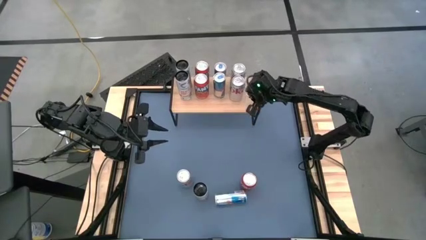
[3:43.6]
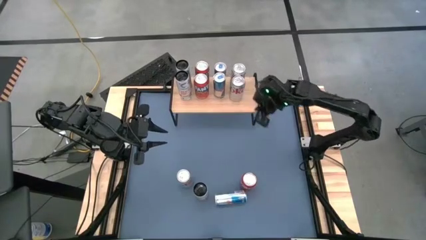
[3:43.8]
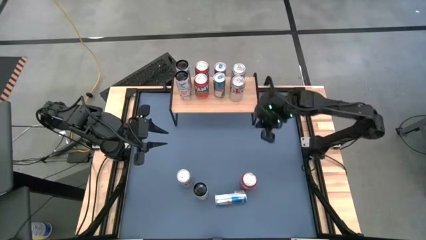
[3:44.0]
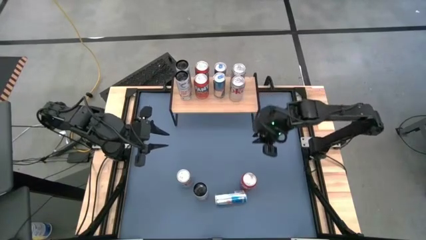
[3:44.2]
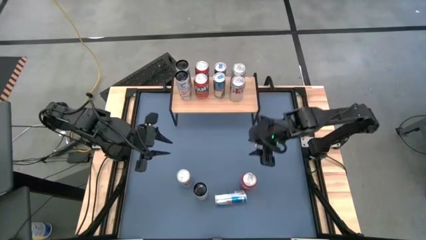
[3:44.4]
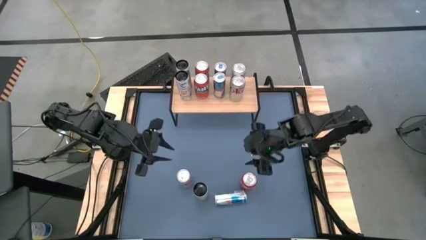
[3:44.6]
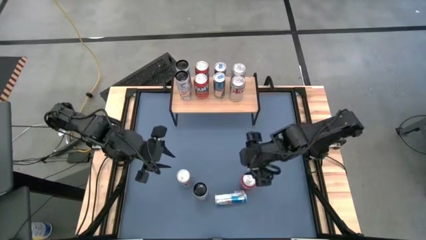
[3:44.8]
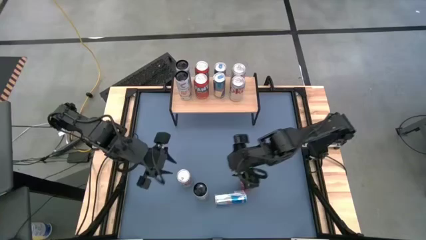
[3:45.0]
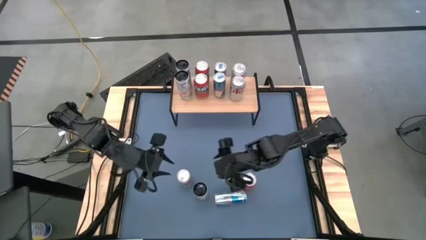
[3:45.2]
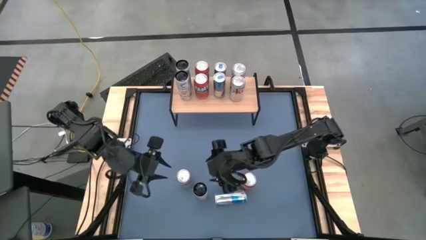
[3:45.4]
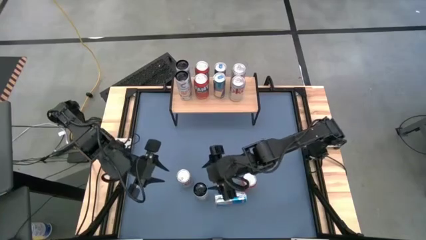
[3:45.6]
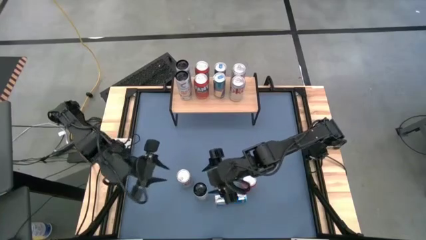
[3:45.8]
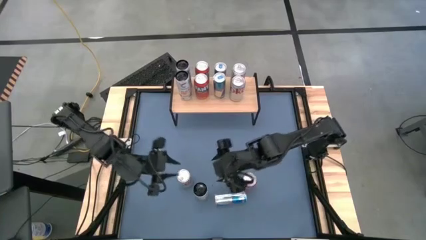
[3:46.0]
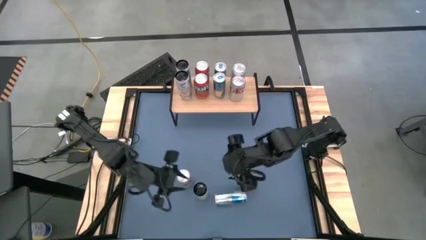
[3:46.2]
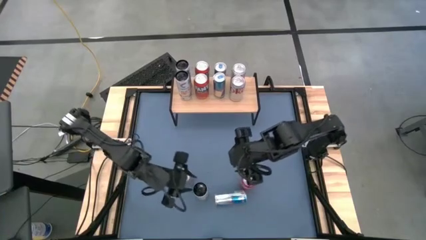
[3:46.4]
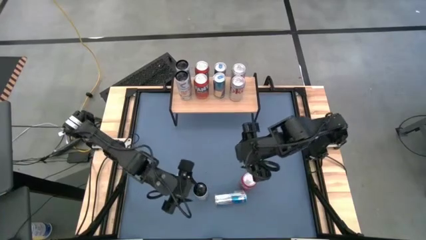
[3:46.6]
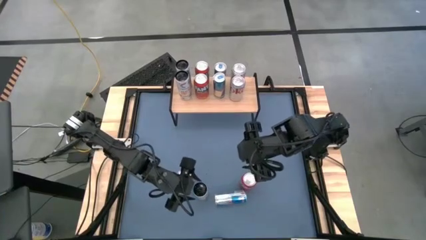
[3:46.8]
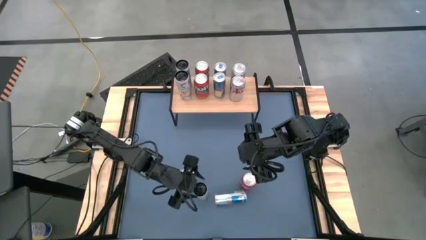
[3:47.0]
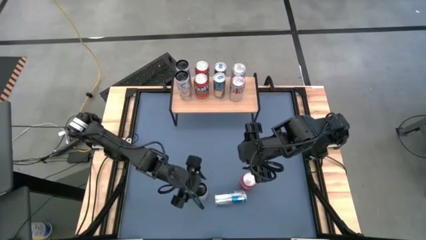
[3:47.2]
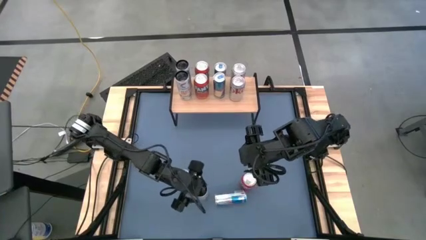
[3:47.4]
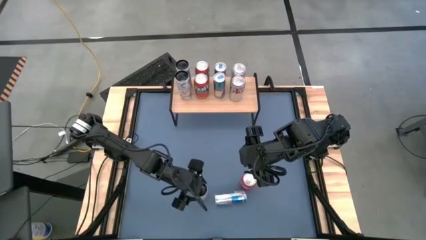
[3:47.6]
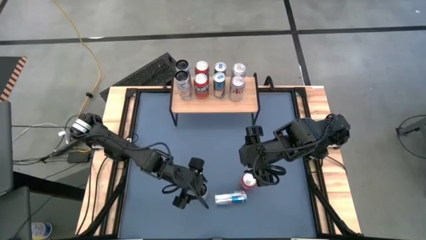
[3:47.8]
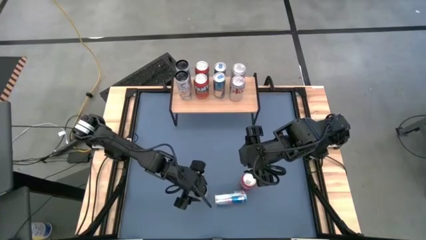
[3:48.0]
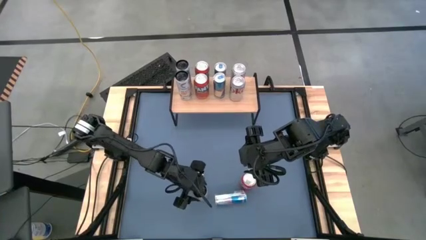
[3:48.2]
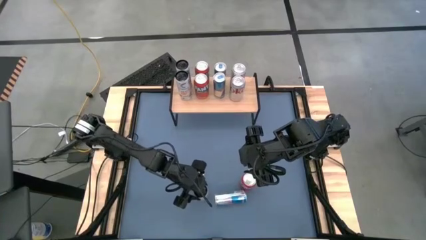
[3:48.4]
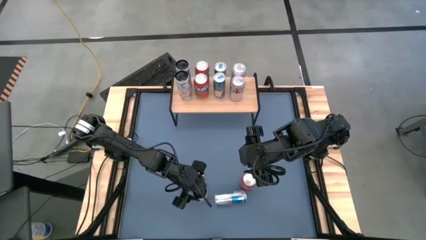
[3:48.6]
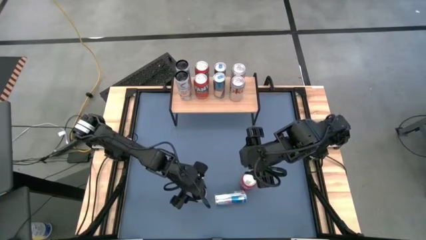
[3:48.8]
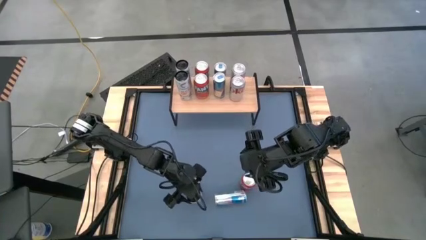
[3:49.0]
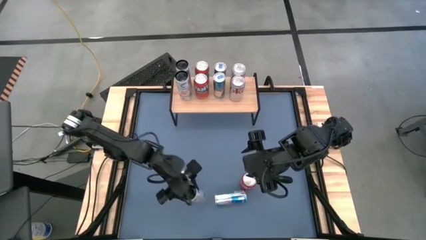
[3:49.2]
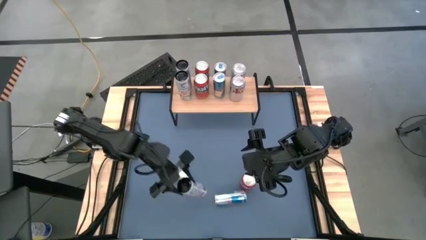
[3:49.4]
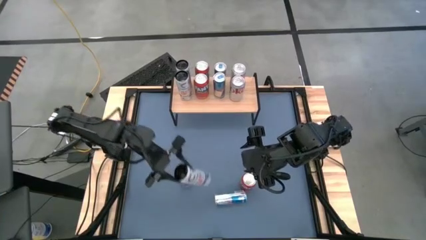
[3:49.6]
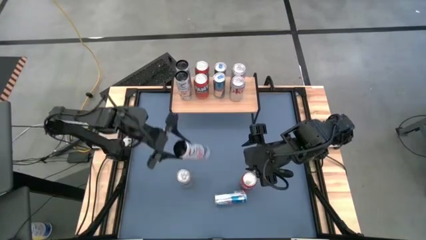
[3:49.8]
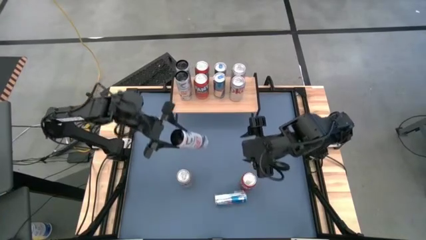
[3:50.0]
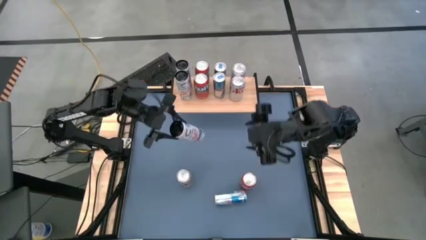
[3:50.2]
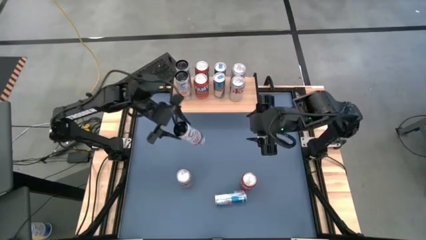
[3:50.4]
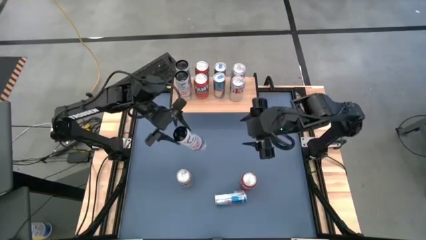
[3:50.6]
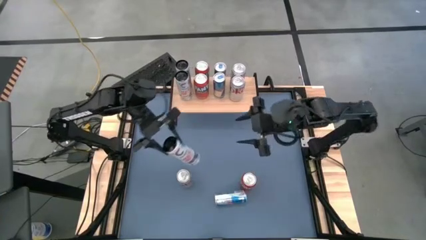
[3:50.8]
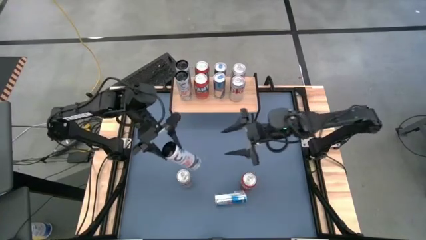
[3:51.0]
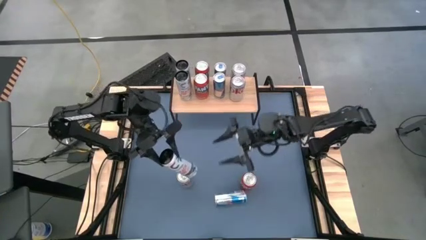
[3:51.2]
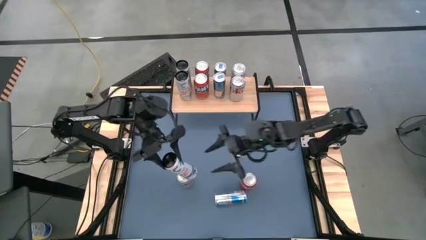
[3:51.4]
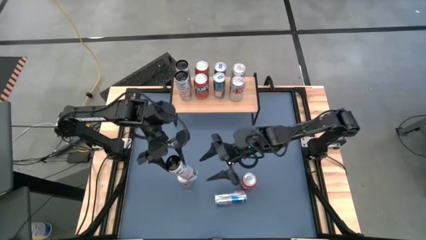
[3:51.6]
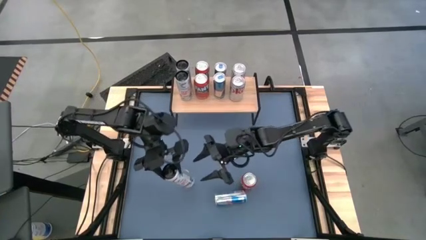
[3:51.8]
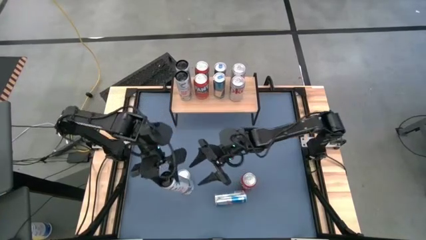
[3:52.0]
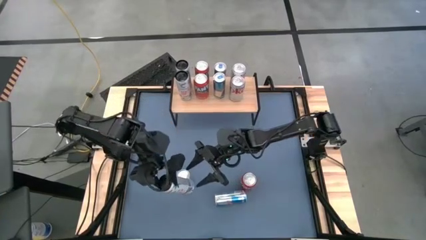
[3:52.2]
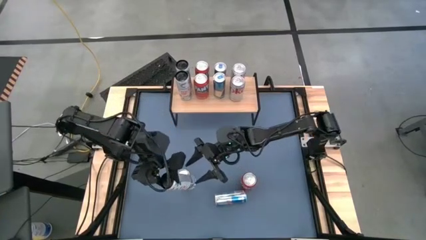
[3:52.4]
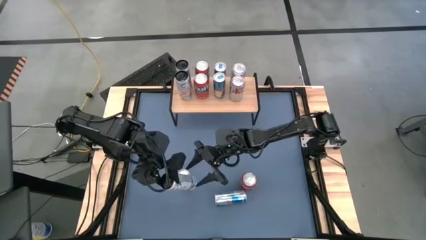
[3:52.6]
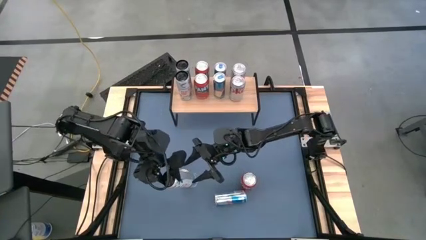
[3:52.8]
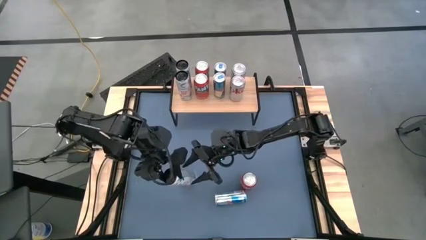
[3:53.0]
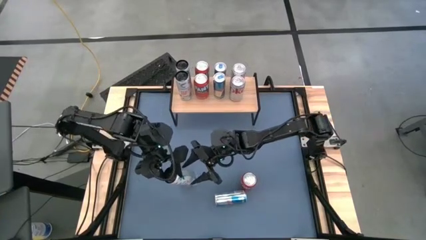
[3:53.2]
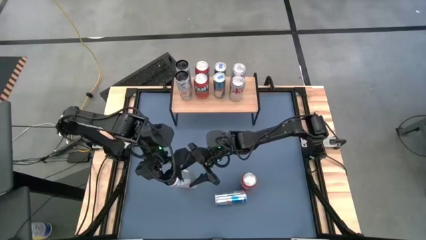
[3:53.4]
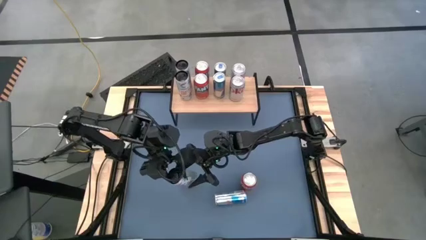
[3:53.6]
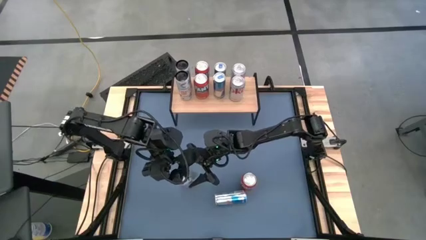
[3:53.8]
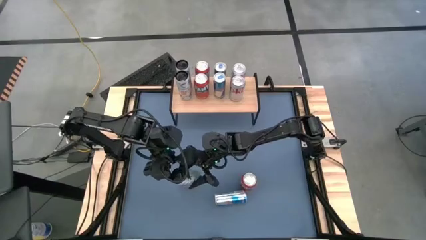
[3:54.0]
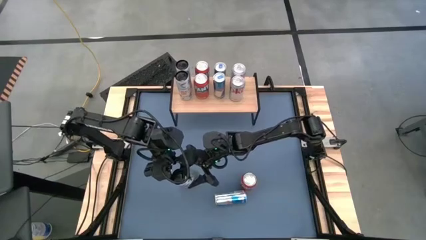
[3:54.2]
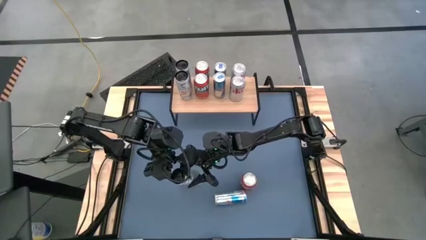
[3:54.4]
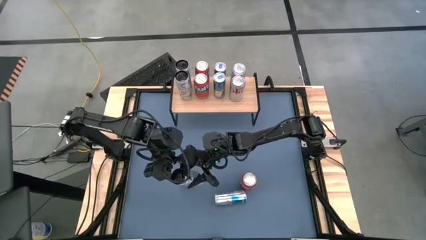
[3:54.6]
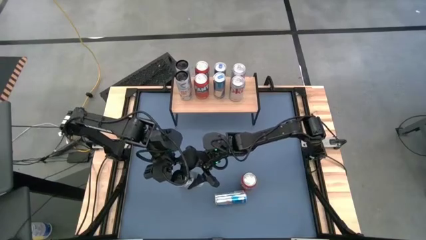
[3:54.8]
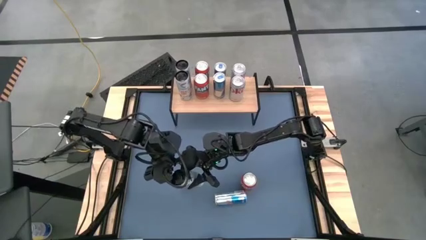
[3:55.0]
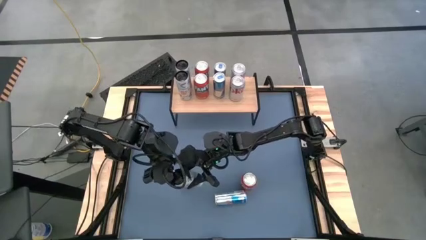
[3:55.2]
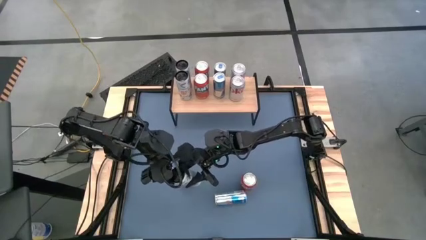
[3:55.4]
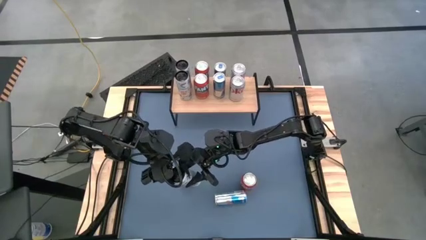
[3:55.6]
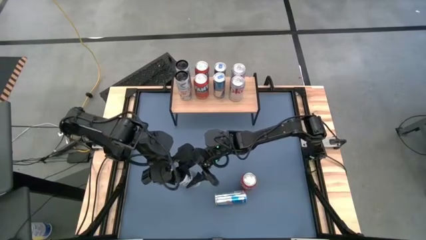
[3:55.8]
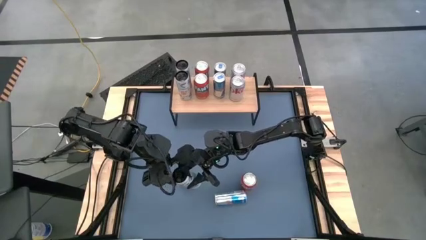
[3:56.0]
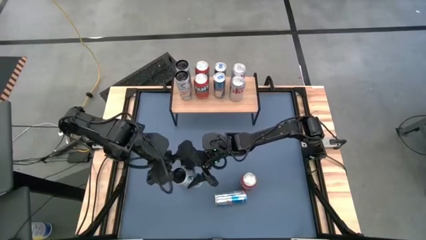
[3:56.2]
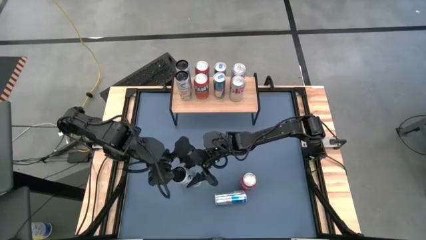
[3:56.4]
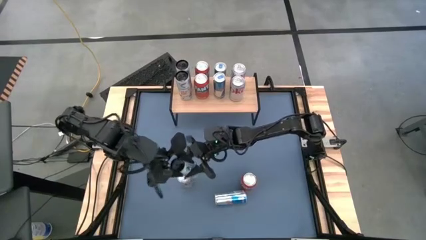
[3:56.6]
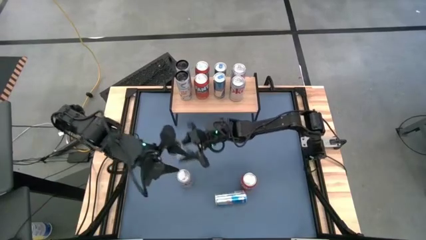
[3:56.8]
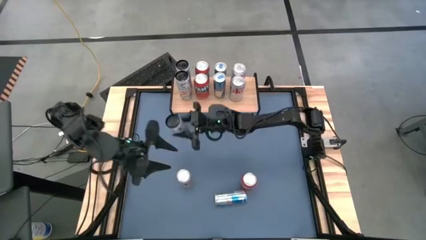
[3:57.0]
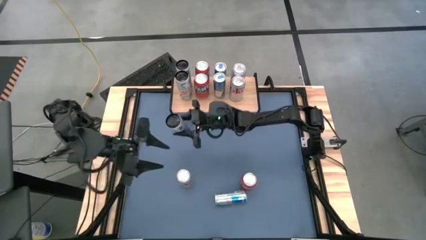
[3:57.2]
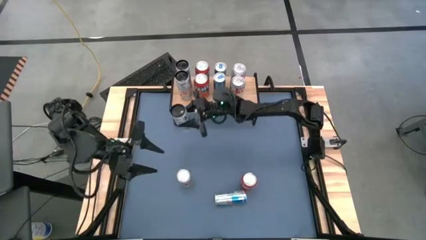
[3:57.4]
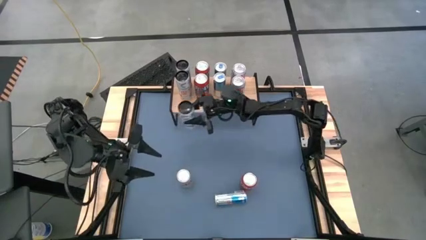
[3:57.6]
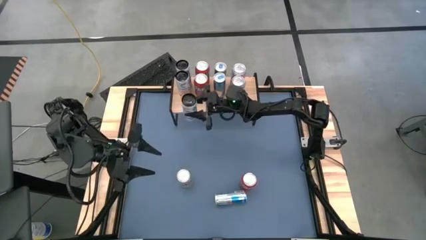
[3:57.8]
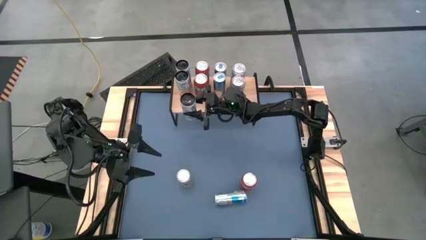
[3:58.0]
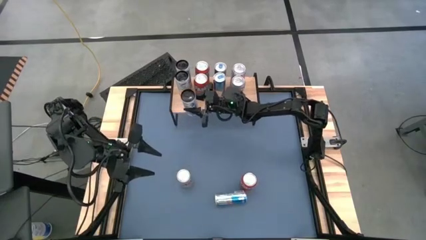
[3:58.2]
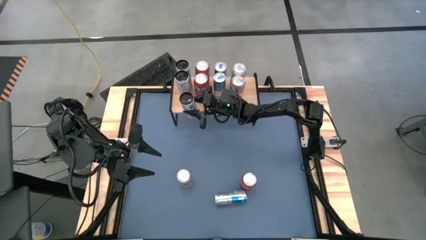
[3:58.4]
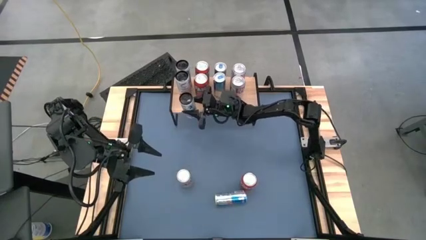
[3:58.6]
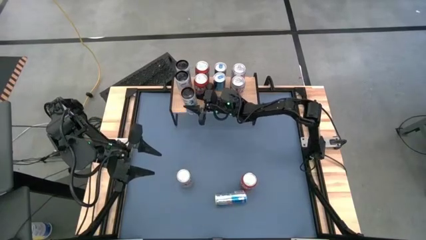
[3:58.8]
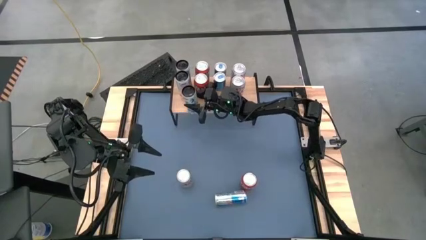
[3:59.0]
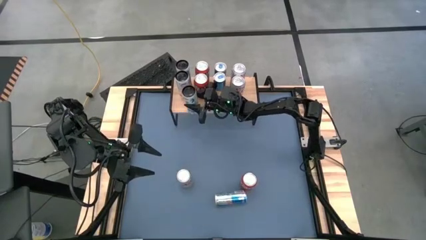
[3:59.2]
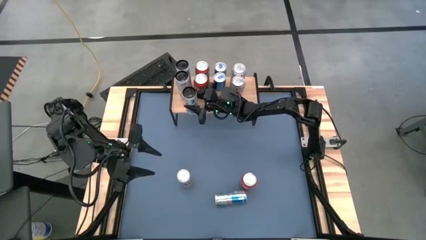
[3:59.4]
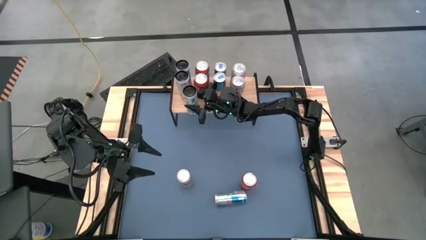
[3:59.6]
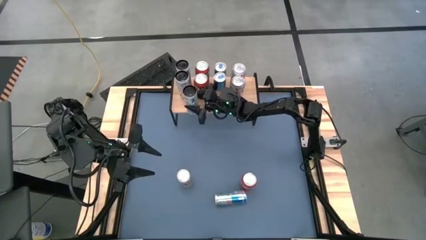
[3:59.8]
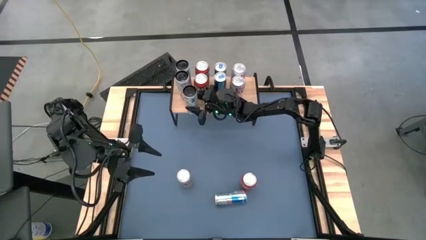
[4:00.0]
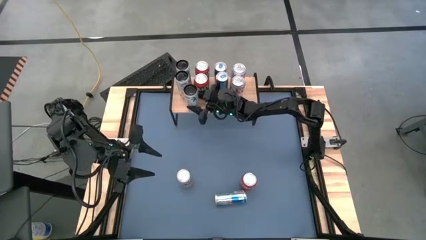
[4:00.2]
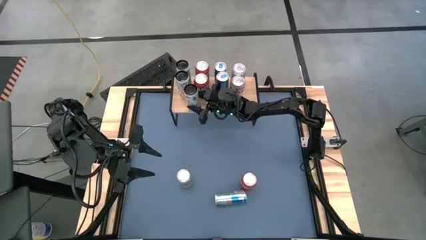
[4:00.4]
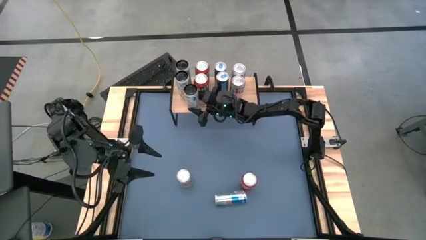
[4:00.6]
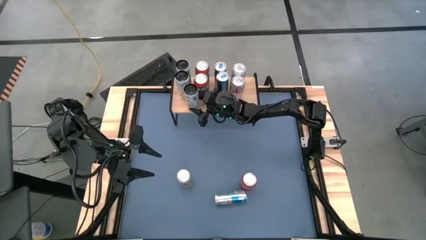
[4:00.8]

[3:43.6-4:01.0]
Task: Place canned beverage on shelf
Put the black soda can on the shelf
